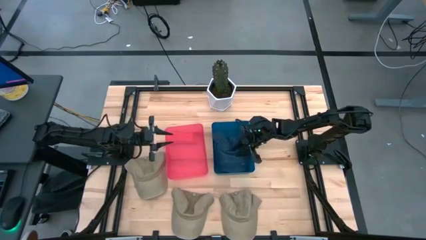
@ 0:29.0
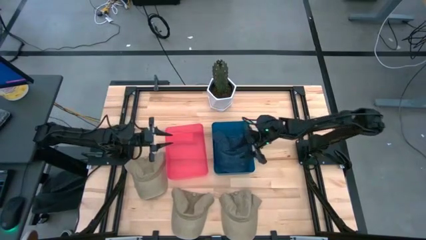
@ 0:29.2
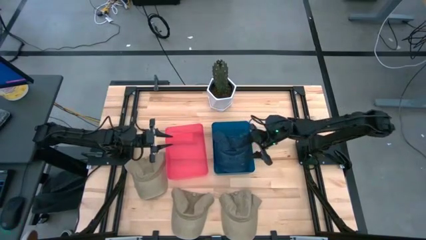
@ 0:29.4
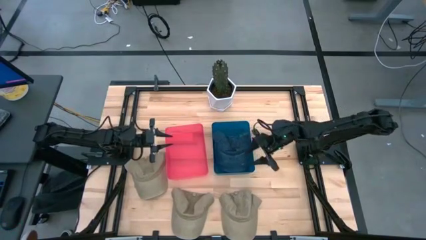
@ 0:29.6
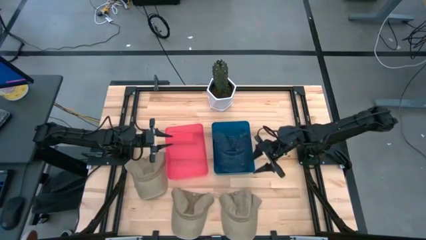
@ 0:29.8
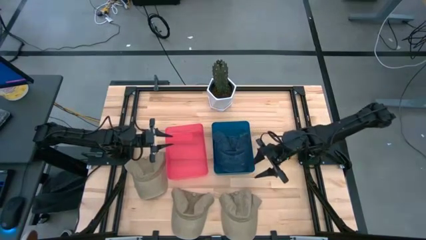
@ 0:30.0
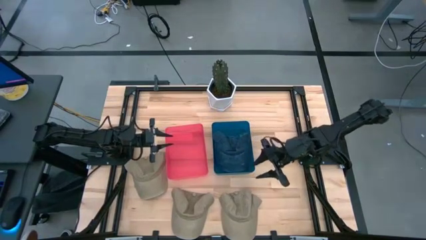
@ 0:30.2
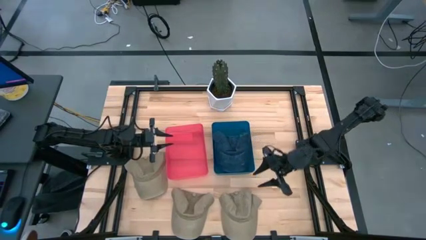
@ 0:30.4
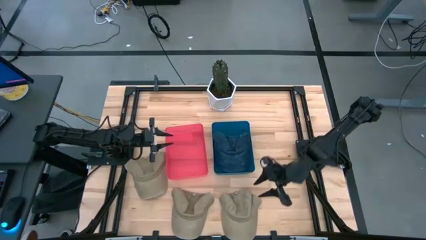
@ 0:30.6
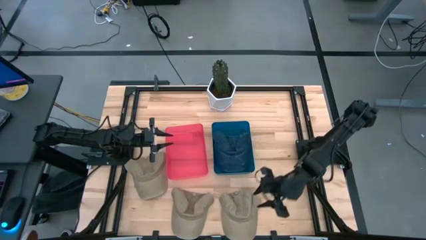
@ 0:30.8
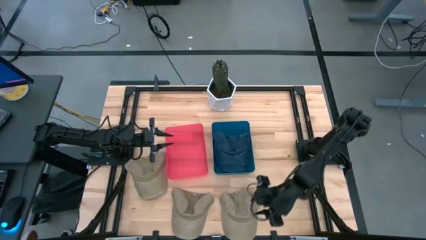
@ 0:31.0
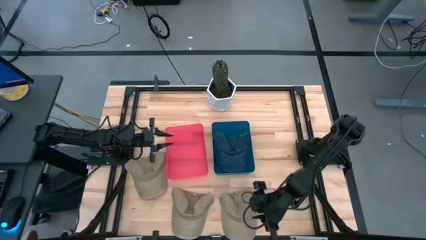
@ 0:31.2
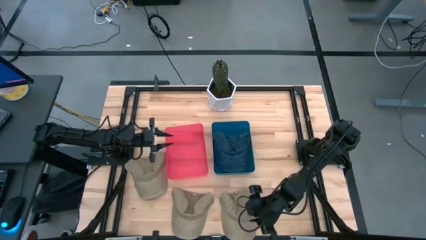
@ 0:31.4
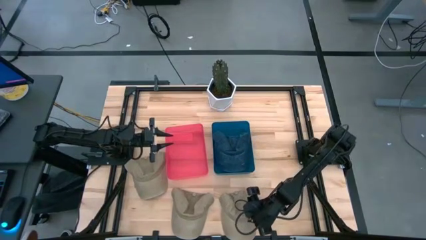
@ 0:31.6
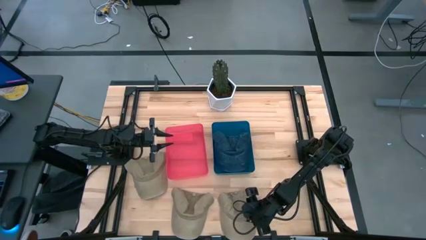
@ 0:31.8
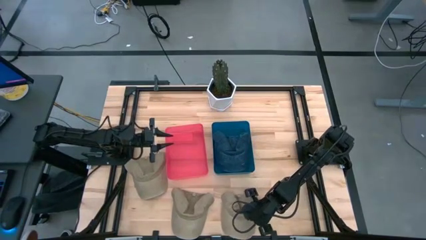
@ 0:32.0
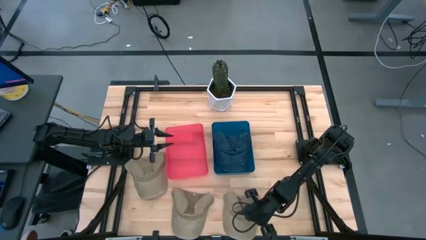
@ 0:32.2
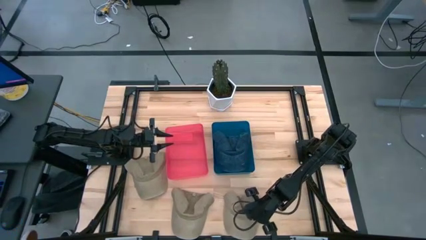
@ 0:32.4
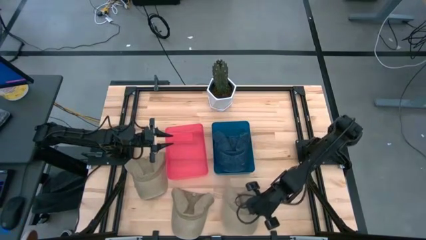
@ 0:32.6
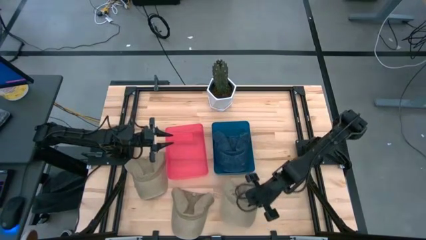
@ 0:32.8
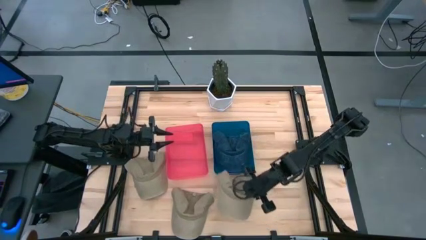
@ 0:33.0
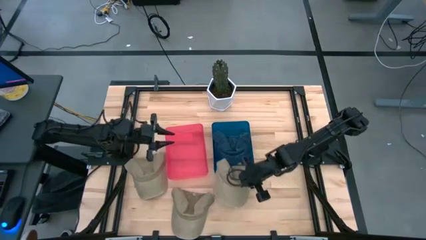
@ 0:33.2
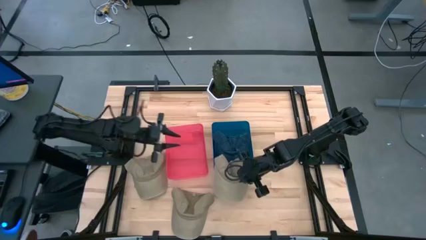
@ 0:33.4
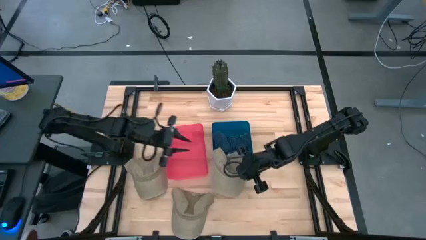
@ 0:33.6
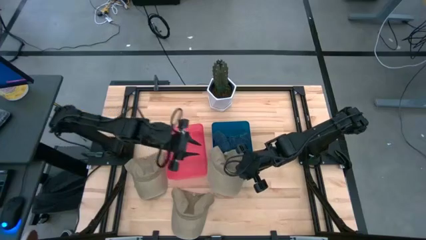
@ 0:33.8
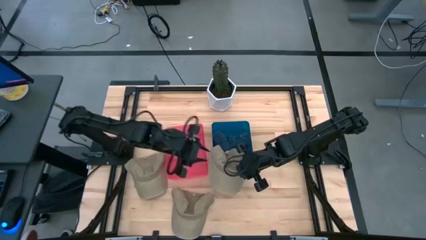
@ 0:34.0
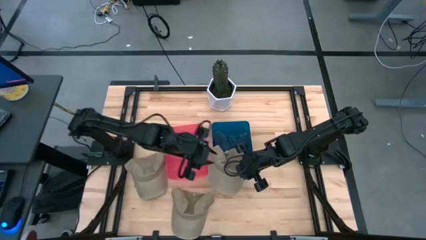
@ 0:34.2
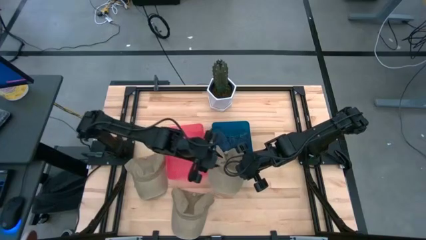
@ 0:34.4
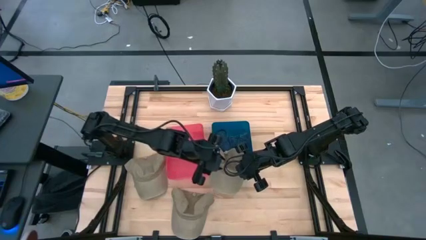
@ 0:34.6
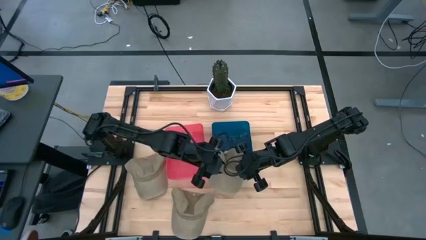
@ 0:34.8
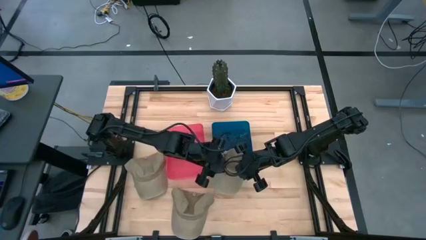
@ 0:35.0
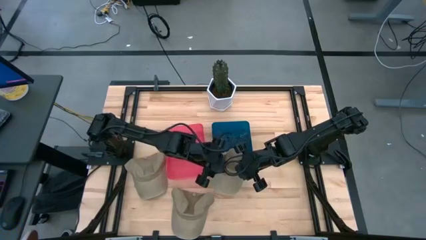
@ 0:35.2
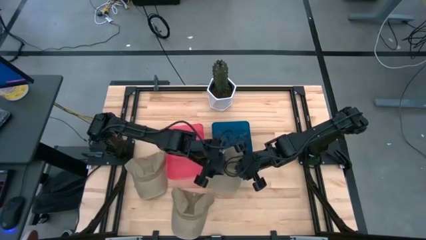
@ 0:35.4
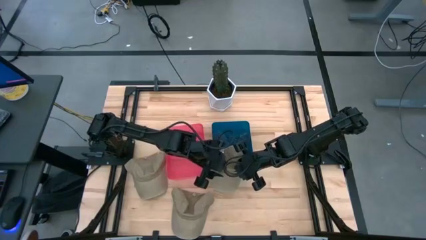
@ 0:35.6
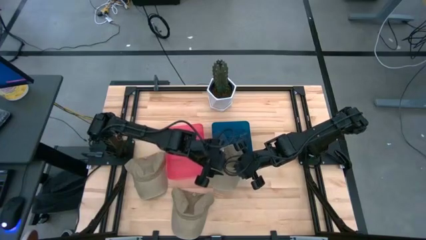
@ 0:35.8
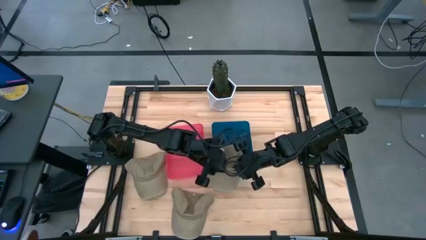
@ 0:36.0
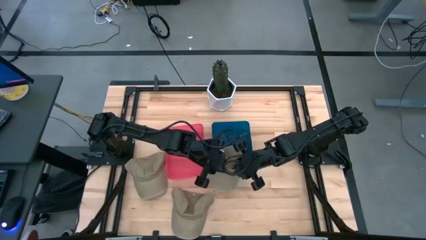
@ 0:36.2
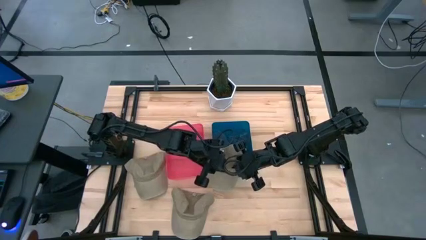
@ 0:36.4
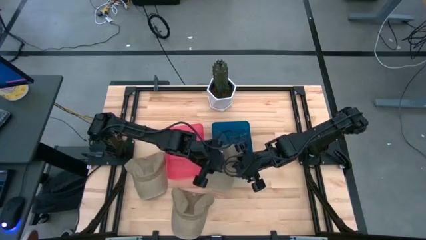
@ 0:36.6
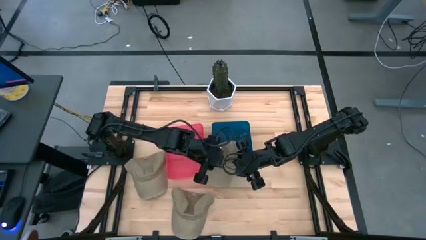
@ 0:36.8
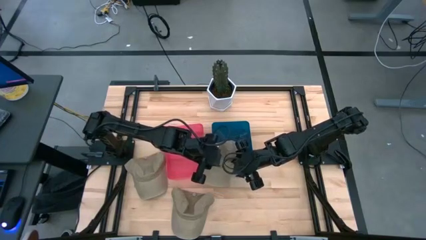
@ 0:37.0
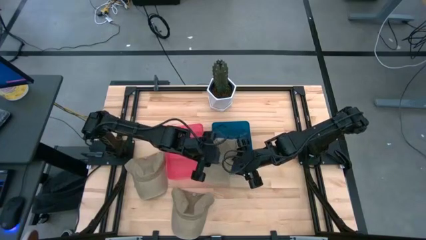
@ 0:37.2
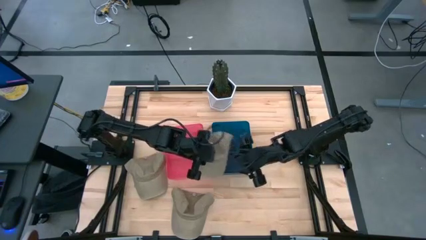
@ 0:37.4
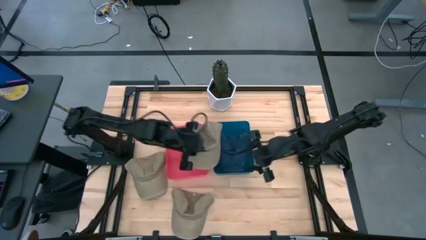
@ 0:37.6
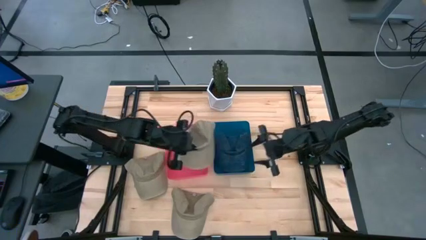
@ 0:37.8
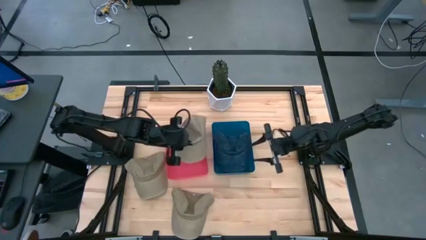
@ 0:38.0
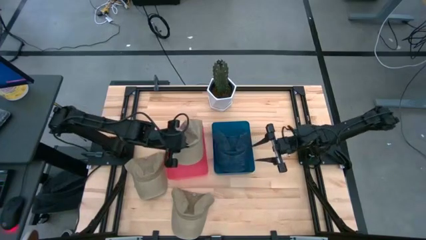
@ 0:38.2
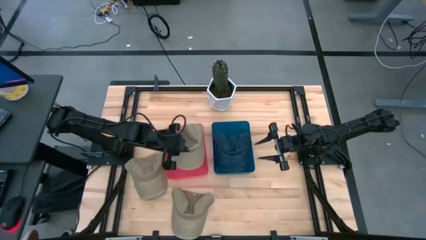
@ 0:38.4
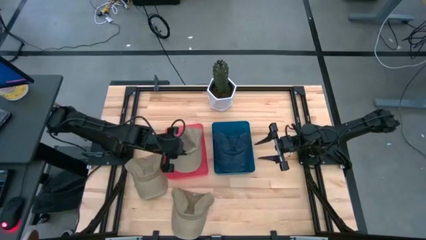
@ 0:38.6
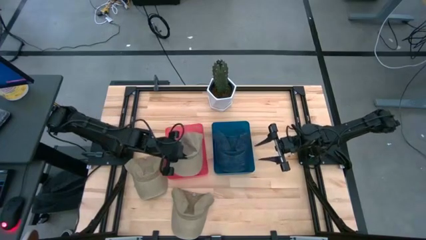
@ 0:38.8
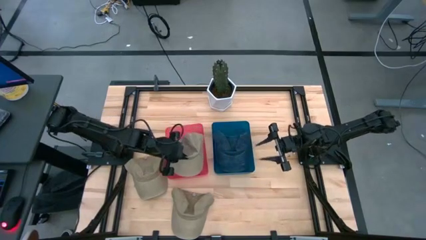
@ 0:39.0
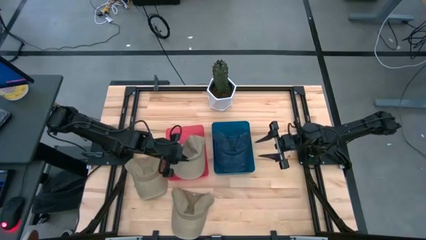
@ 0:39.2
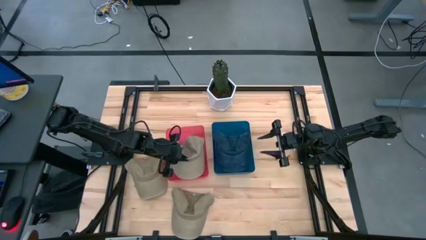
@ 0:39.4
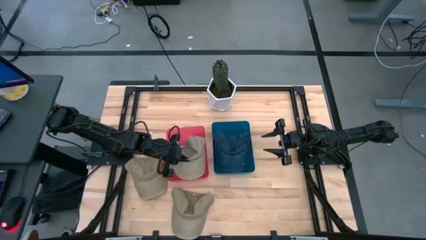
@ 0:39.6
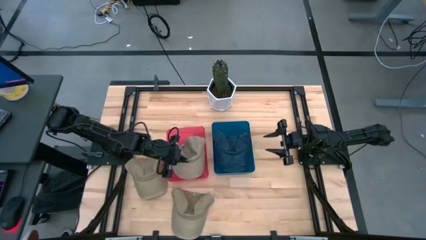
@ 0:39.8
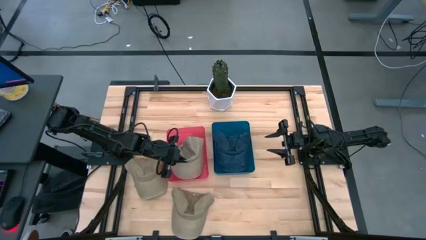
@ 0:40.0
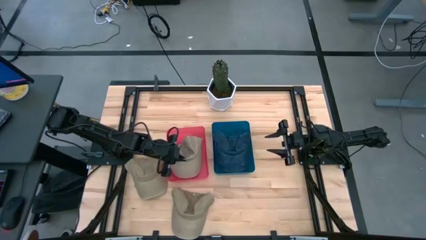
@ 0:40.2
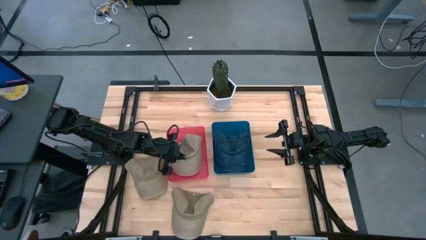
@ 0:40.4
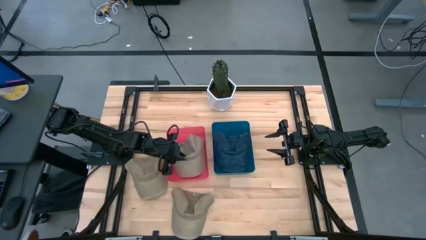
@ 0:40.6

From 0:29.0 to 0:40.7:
Task: Pick & Place hat
Put the bottom right brown cap into the red bin

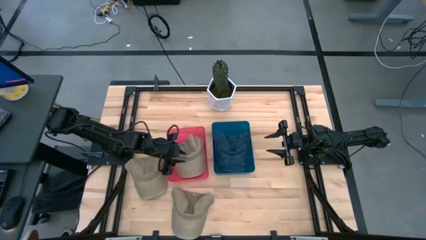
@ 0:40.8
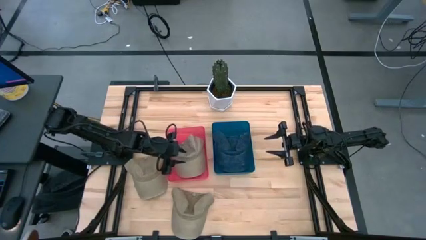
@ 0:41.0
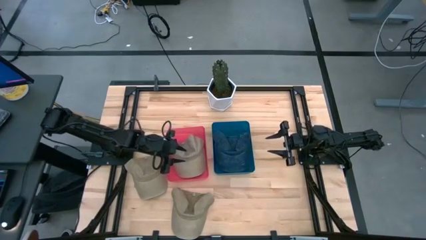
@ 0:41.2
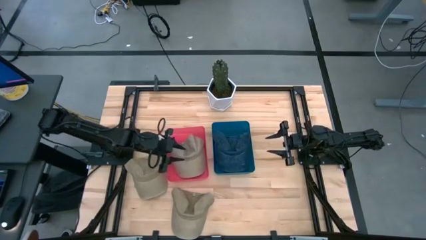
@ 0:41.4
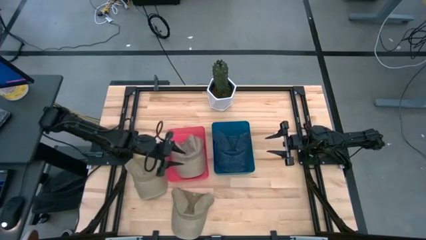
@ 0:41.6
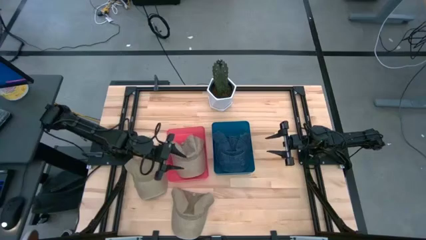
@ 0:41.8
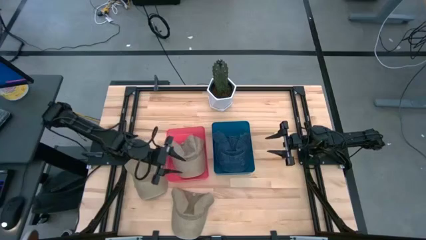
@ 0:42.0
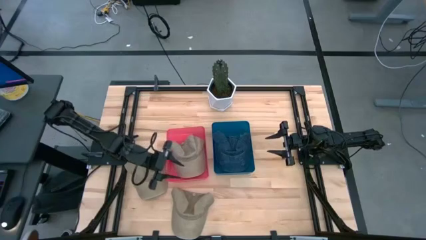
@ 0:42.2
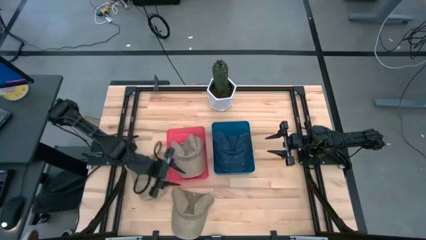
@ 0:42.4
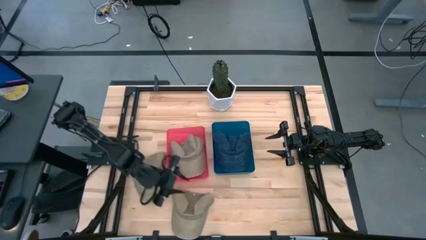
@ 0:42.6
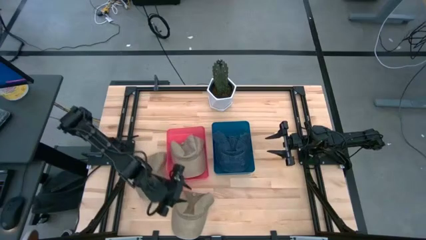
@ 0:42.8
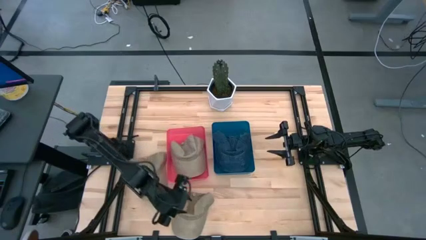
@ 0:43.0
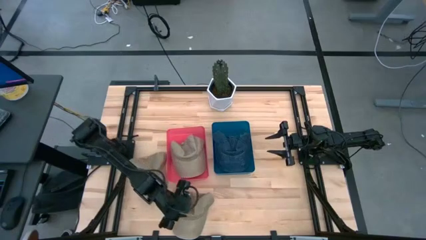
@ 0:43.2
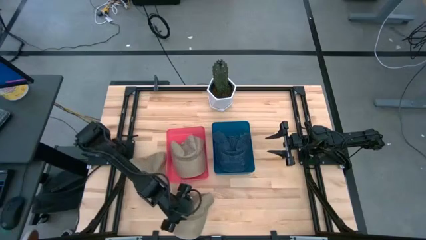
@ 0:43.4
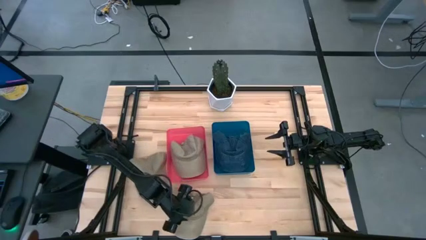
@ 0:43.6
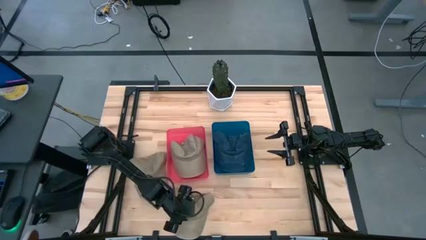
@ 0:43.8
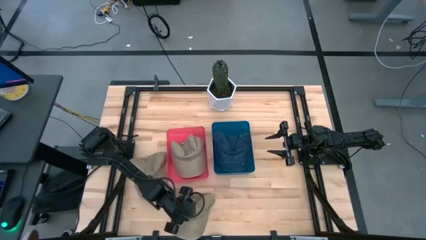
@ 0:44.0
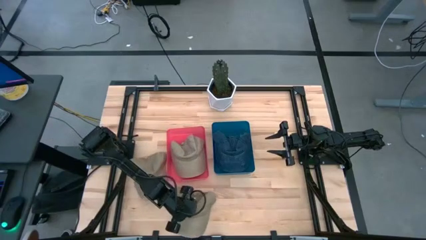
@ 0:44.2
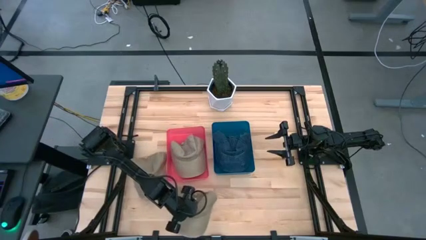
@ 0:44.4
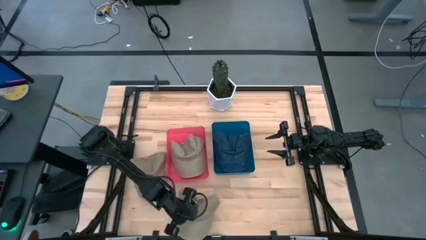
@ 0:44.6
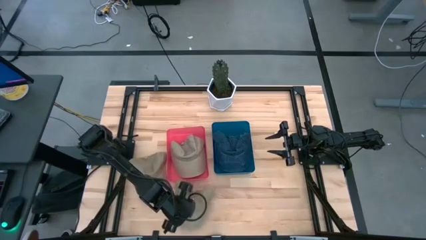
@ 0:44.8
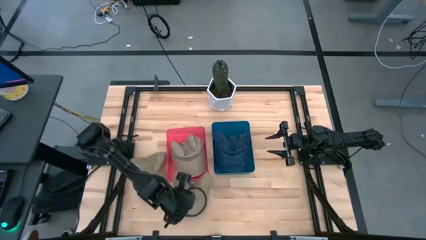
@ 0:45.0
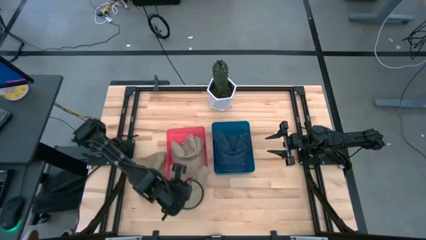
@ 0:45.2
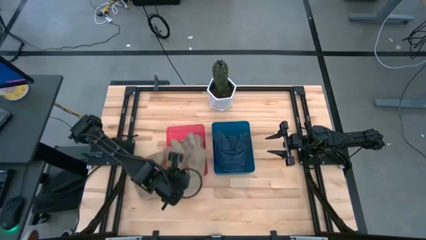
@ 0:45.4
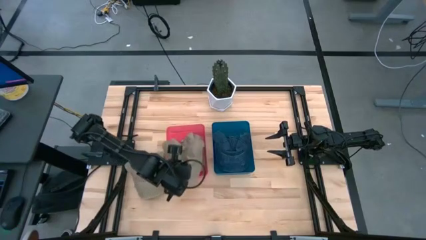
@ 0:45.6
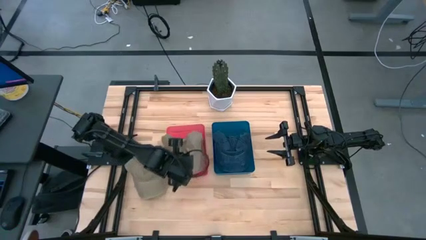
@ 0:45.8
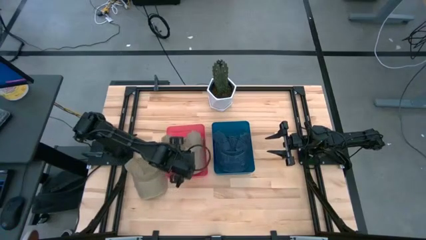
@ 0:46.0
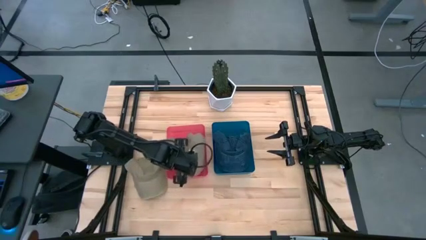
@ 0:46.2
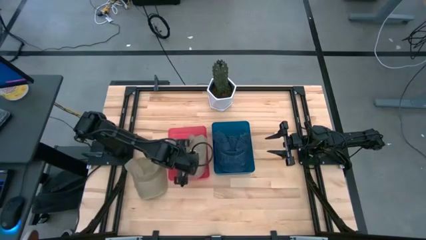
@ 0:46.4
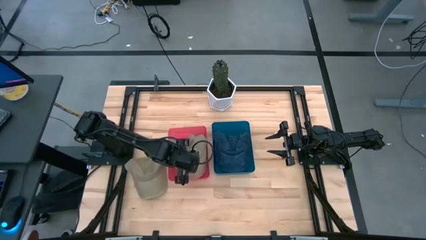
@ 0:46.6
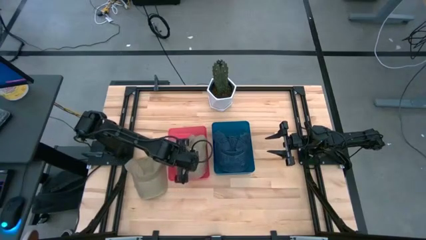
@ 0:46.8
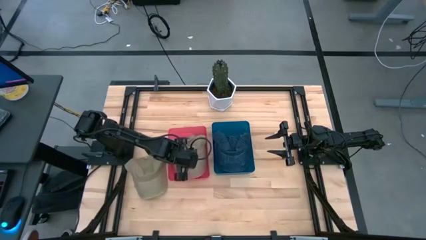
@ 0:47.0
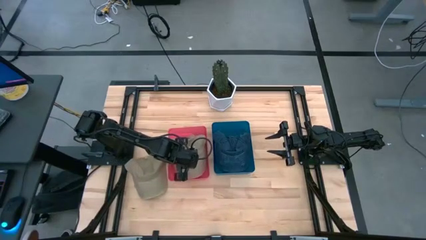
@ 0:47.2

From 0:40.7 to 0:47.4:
Put the bottom brown cap into the red bin
